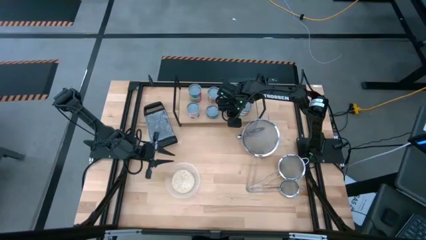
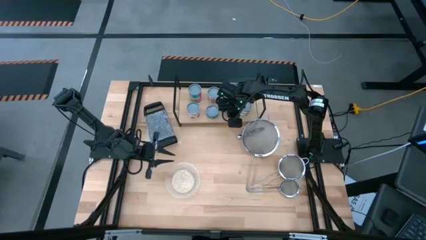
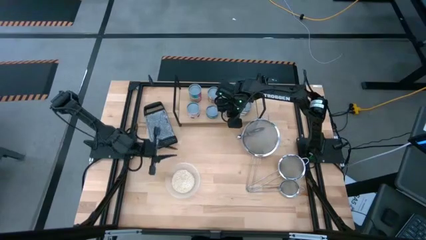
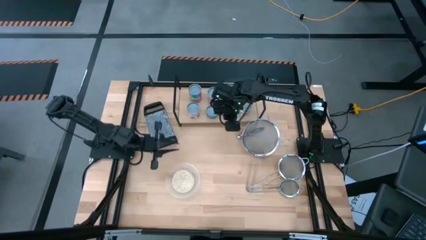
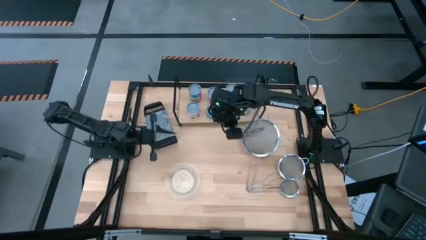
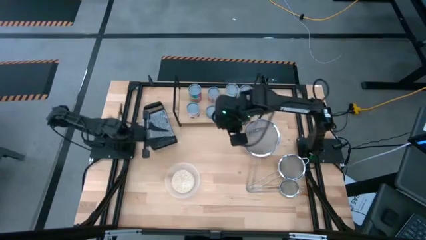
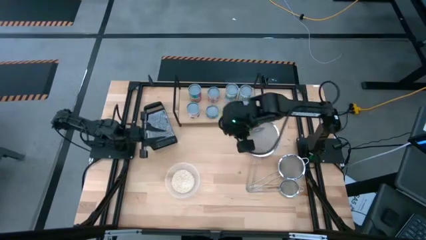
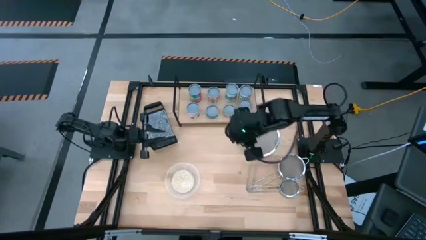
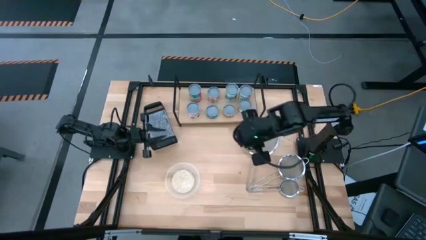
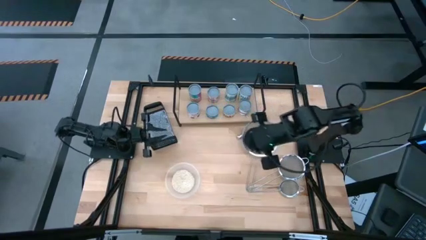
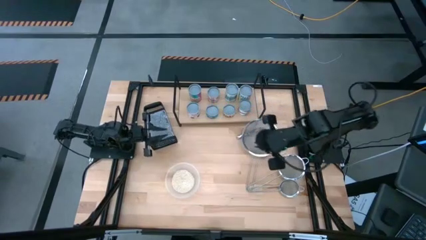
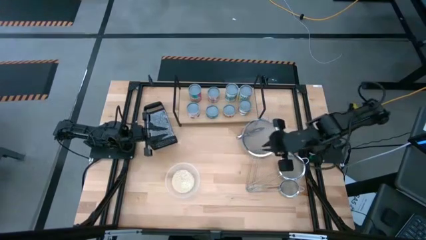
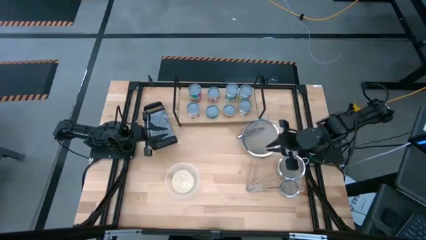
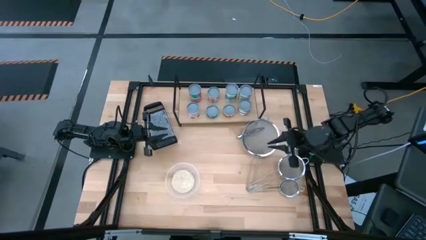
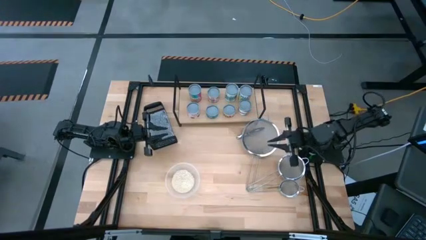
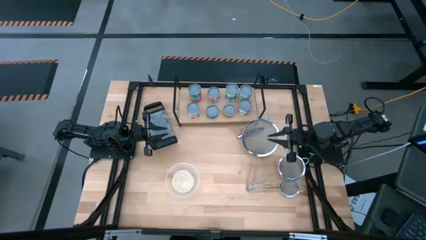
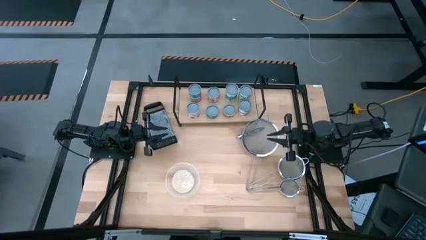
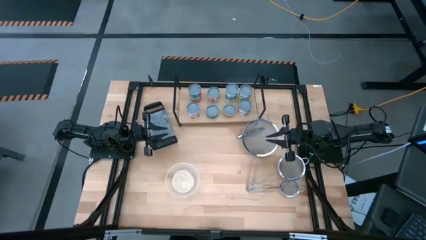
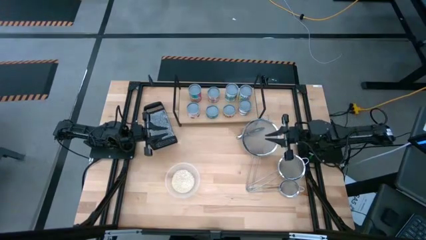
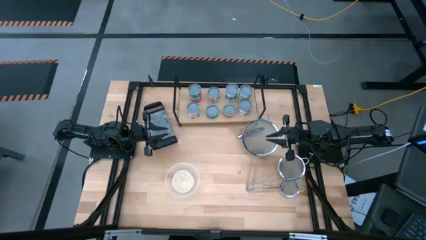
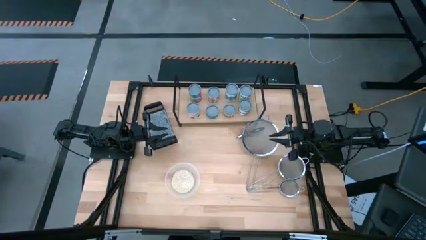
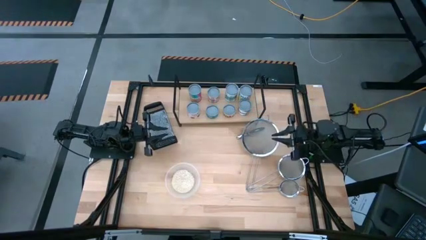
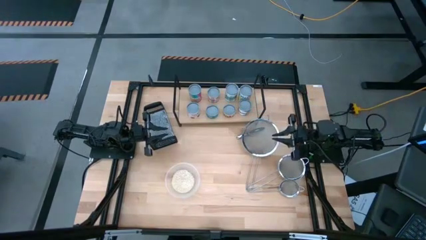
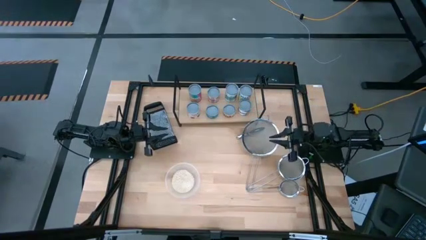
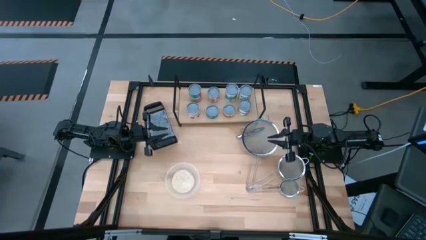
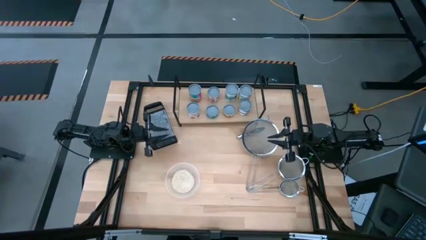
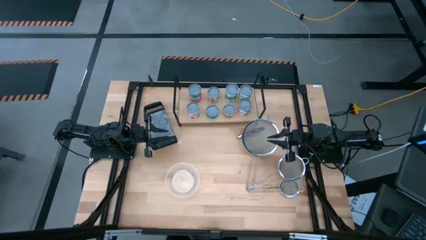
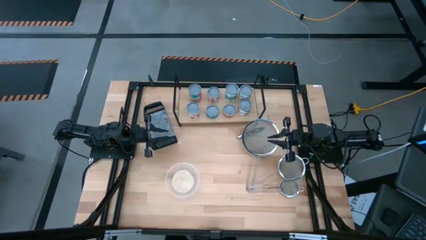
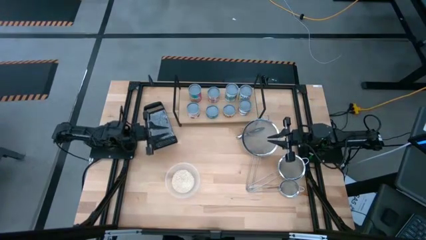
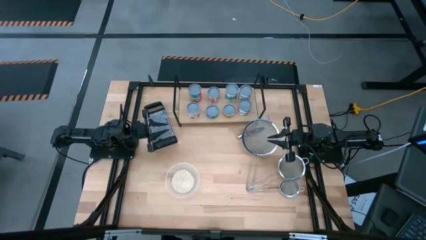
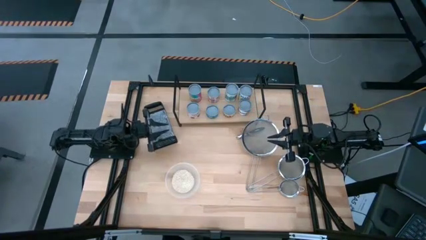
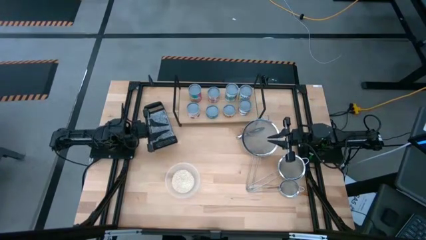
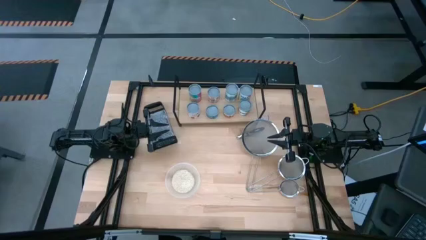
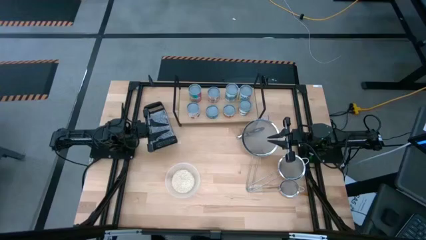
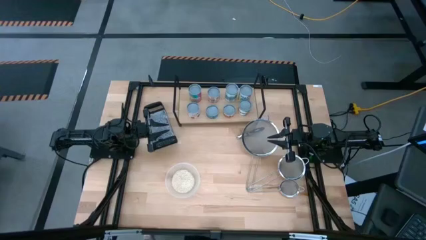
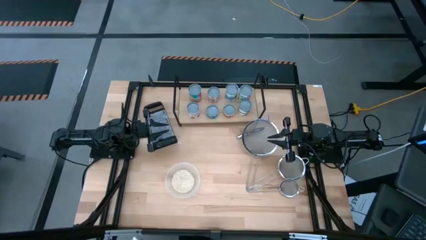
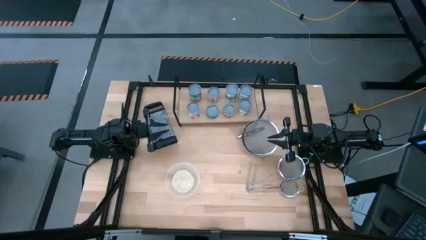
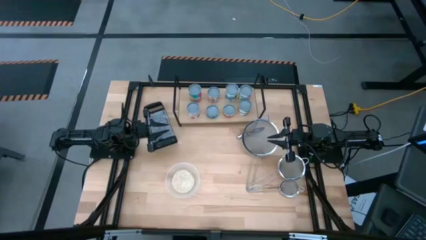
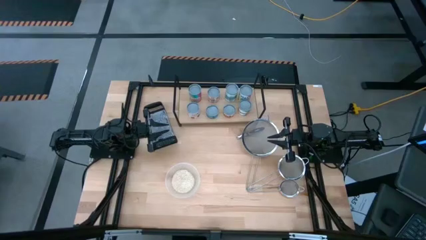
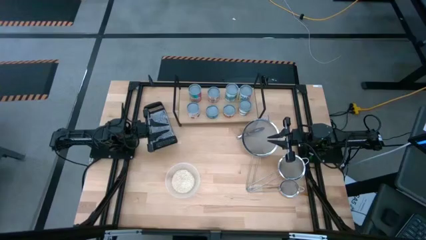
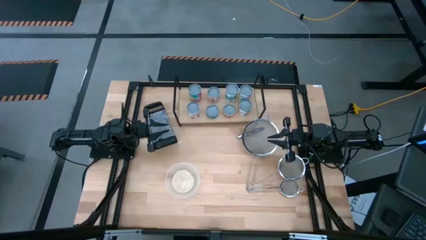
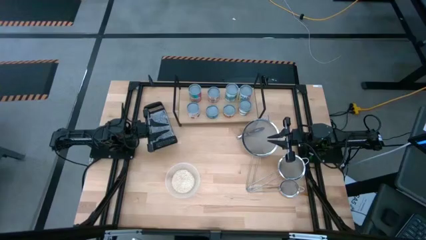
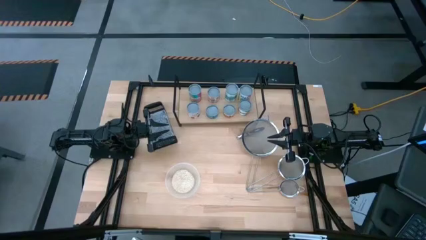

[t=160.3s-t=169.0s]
Task: Pick and place cans onto a shelf
Return to Home Position

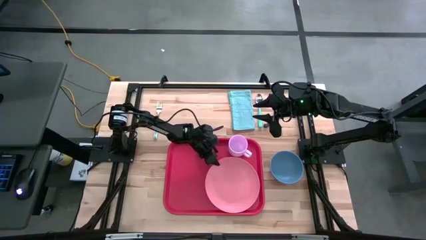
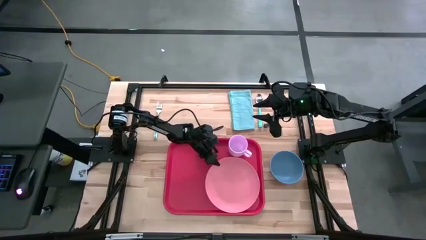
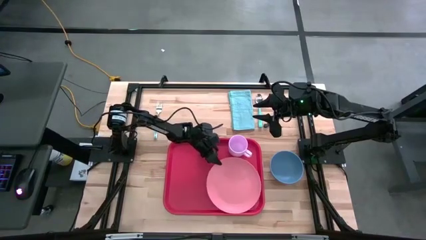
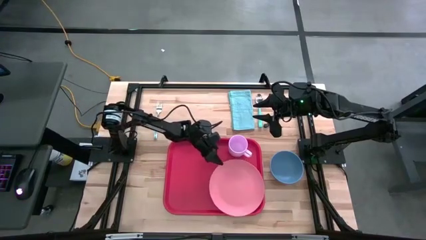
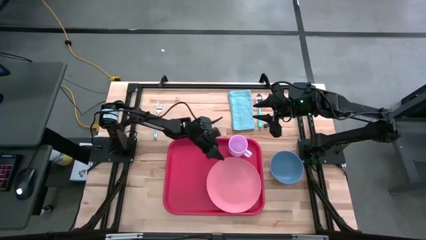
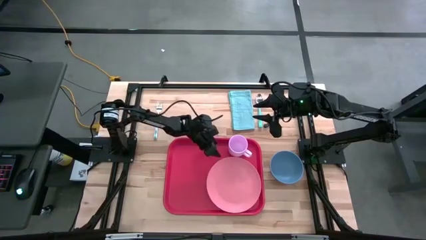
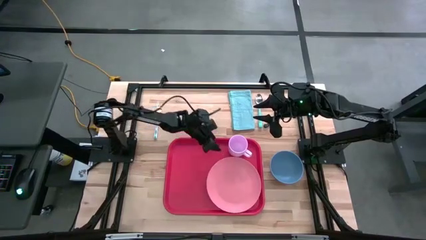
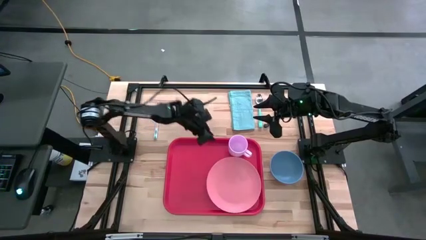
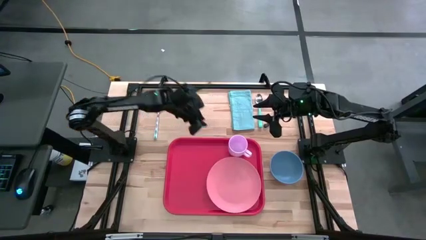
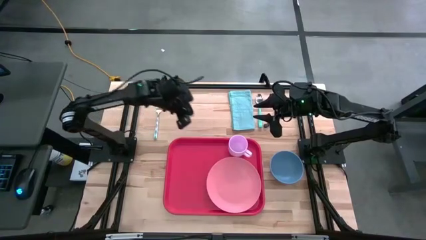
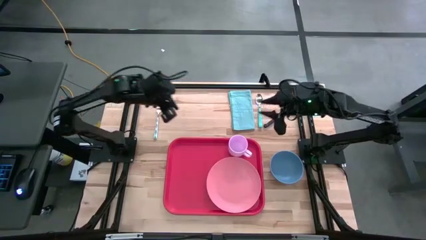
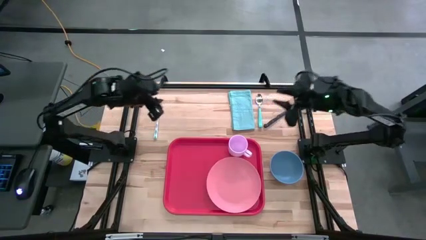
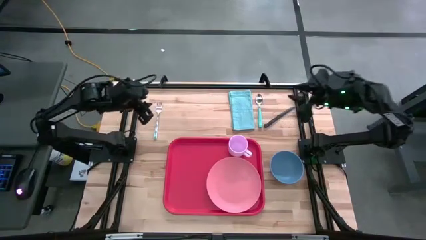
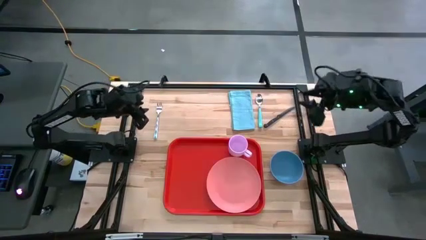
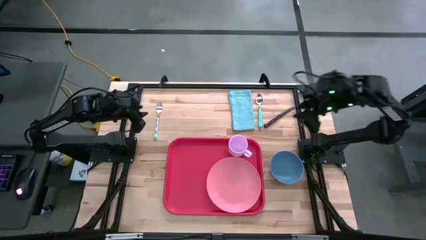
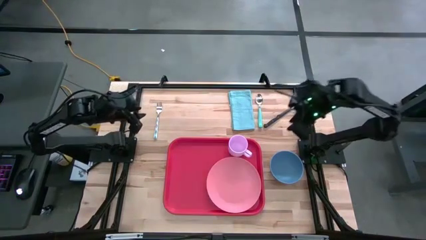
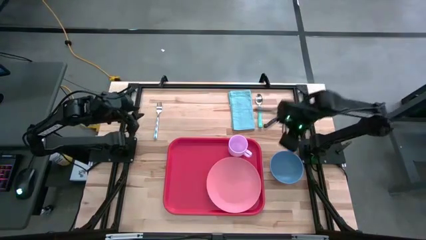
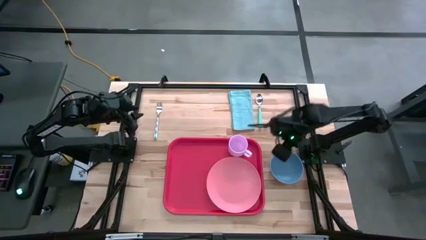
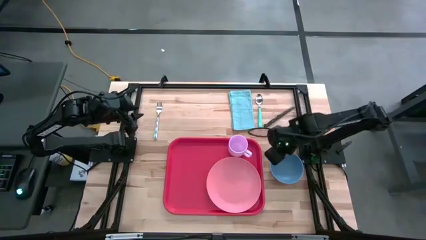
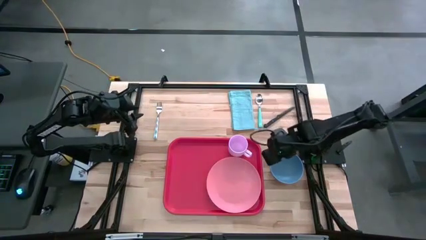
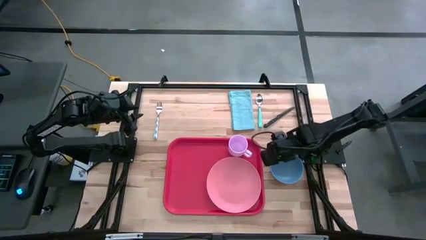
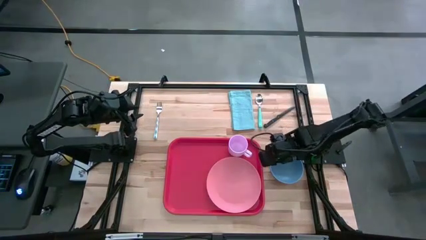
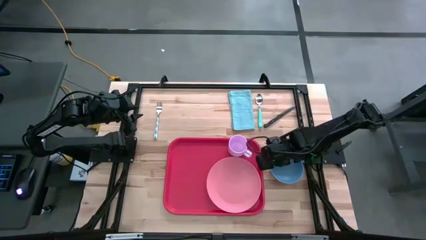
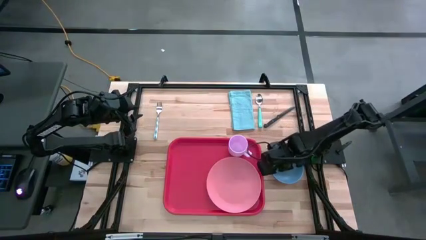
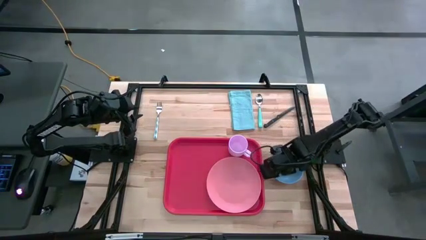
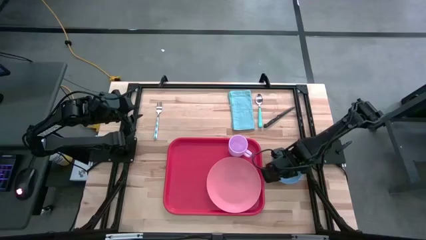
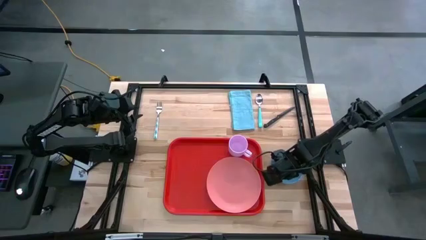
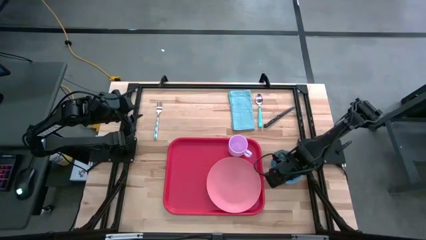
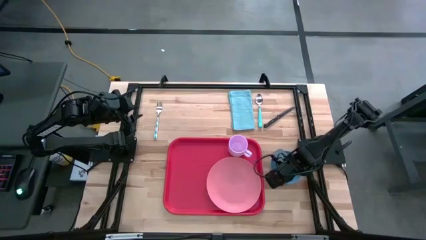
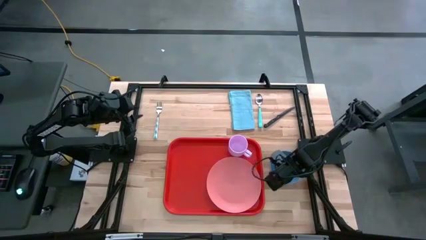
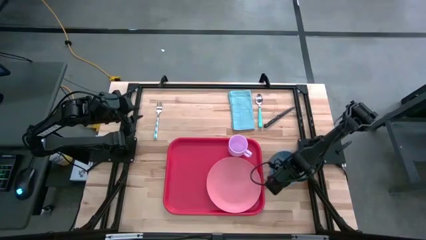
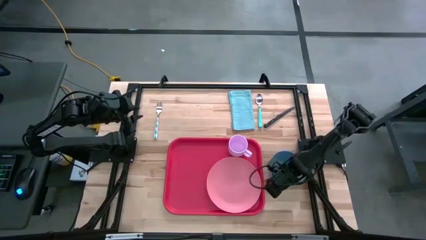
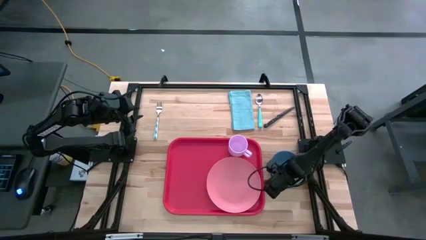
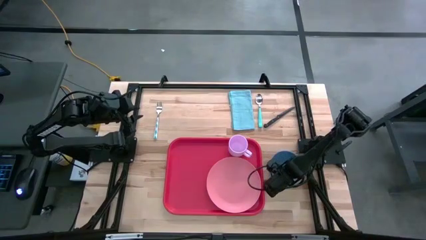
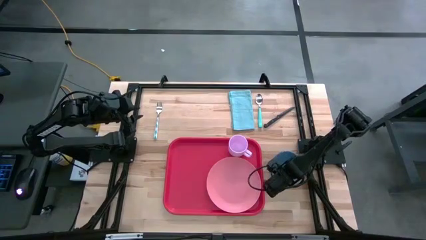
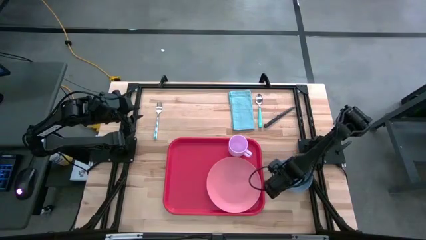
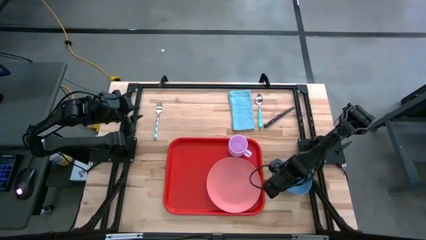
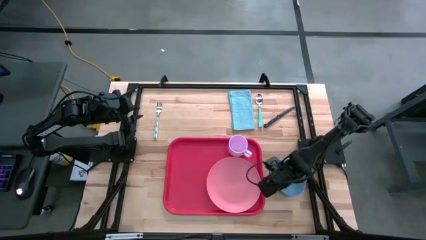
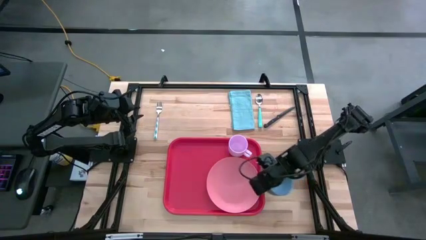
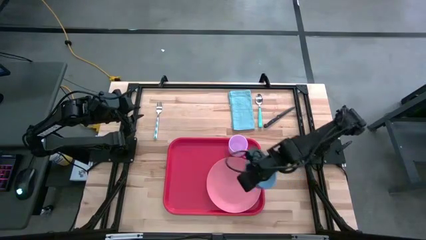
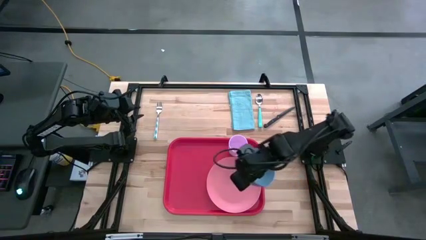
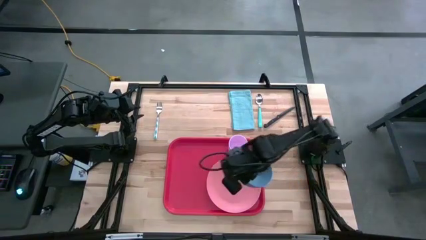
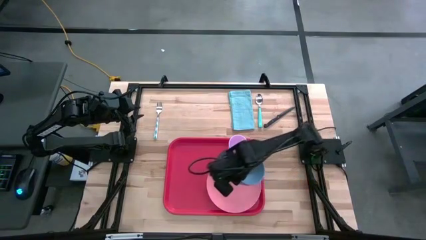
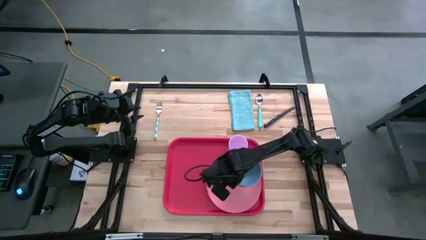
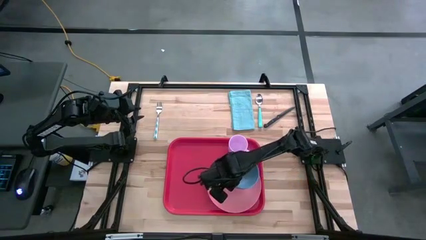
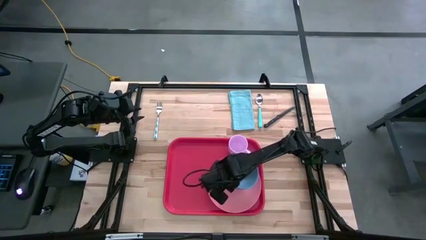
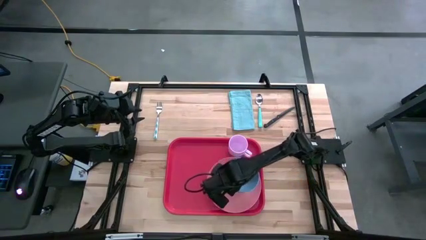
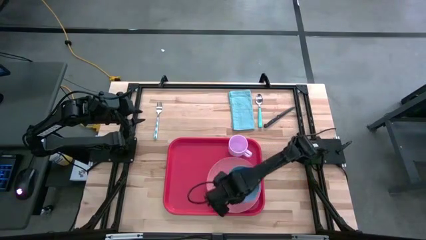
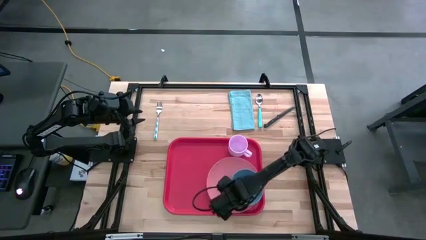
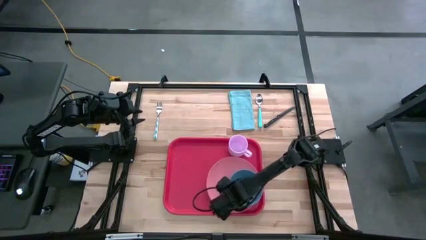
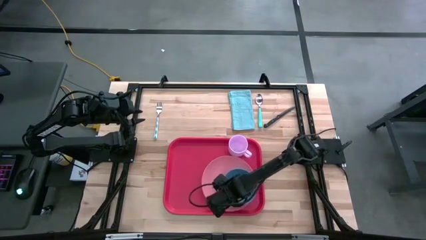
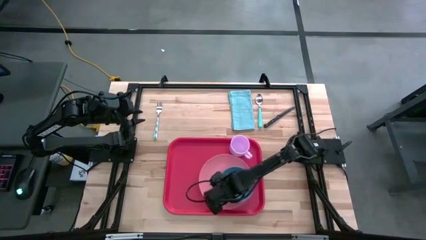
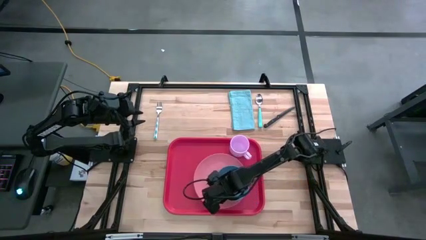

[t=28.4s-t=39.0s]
Task: Set up tray
Put the blue bowl on the pink plate on the red serving tray
